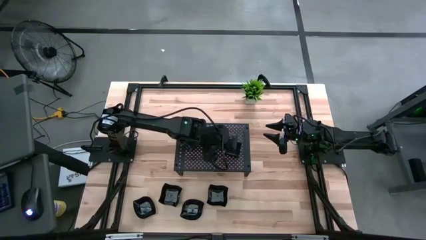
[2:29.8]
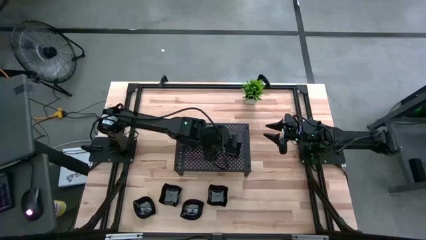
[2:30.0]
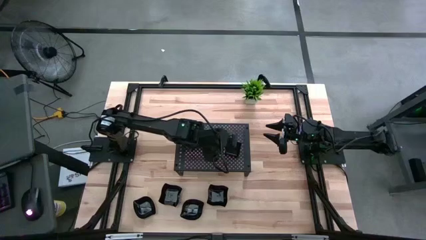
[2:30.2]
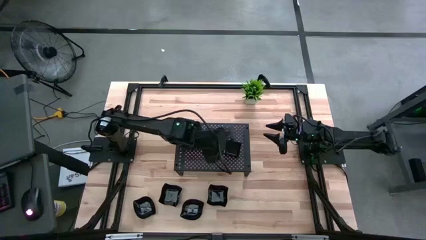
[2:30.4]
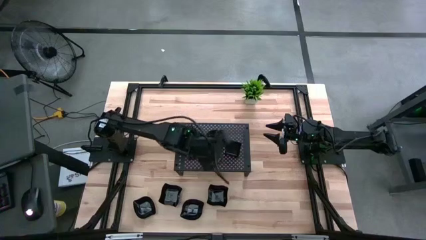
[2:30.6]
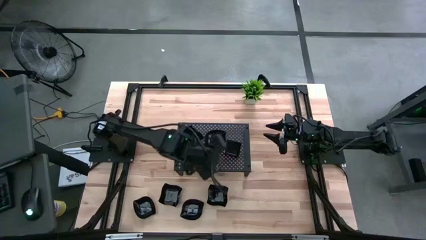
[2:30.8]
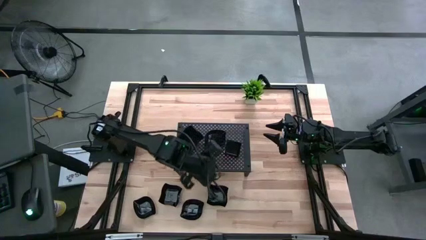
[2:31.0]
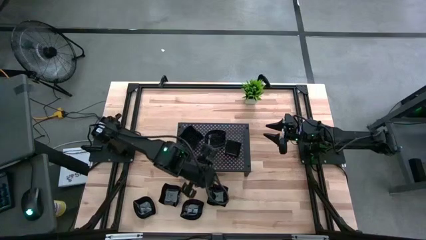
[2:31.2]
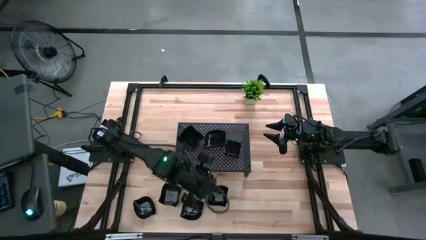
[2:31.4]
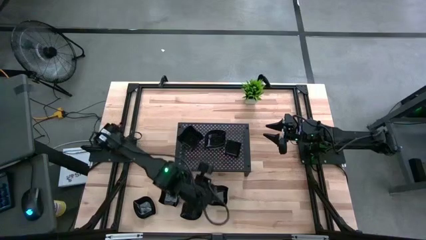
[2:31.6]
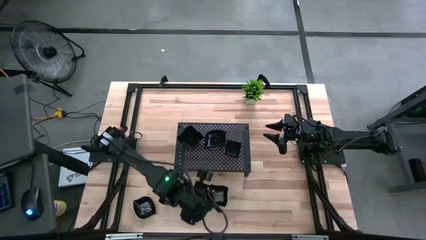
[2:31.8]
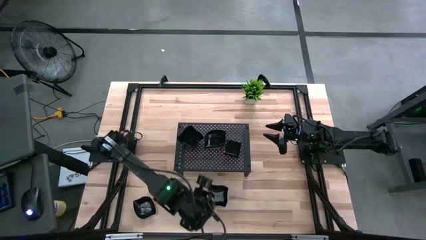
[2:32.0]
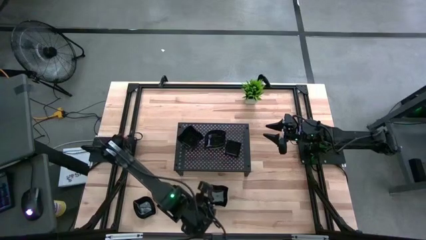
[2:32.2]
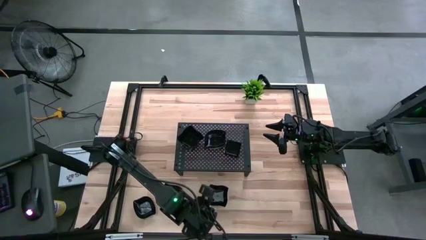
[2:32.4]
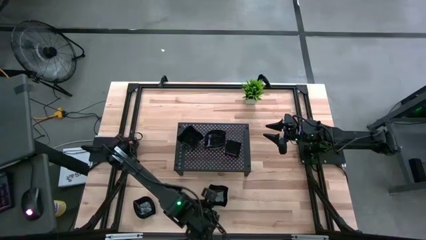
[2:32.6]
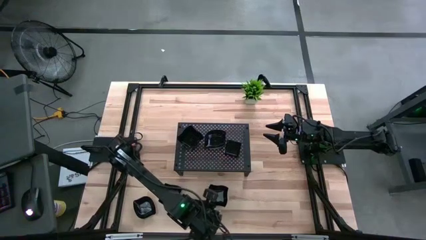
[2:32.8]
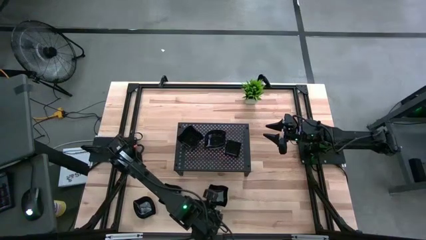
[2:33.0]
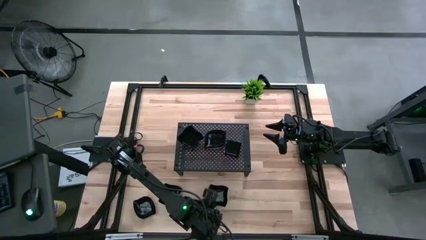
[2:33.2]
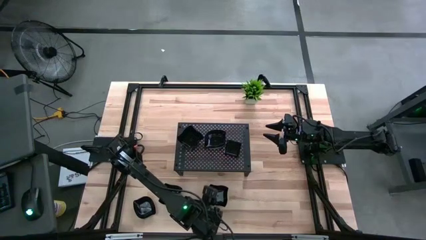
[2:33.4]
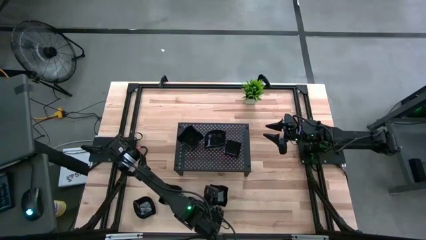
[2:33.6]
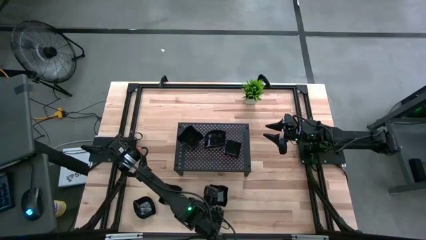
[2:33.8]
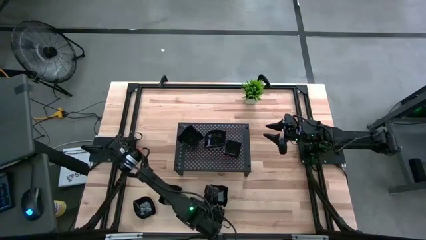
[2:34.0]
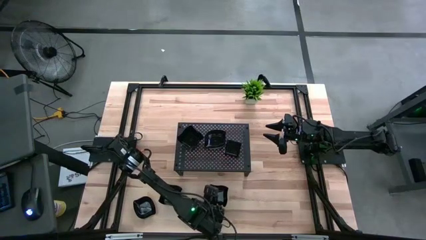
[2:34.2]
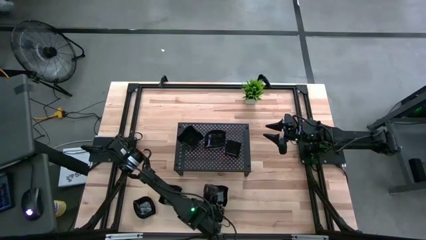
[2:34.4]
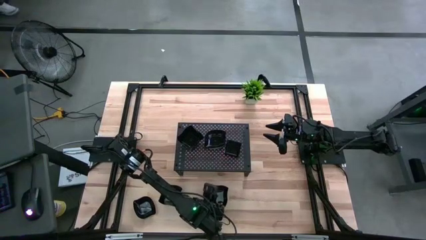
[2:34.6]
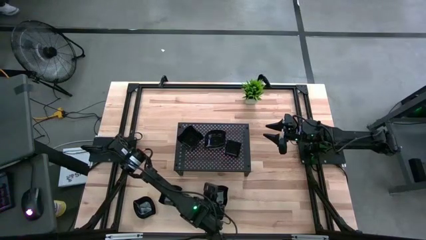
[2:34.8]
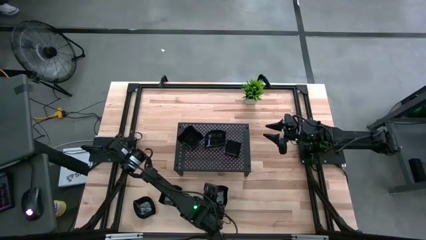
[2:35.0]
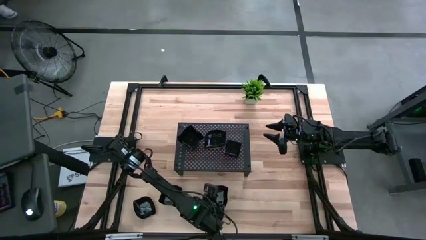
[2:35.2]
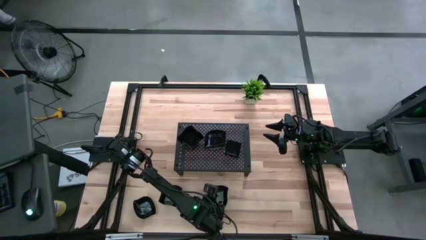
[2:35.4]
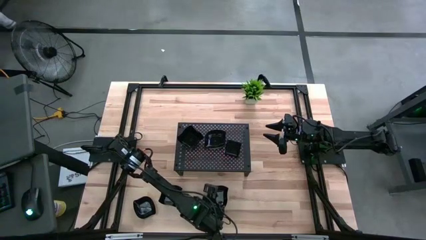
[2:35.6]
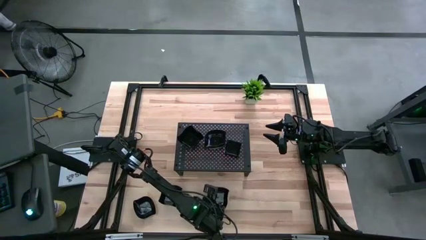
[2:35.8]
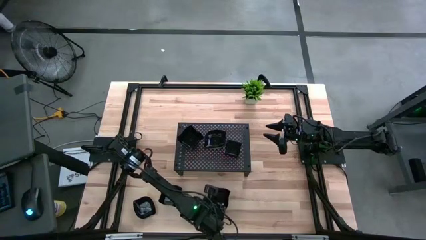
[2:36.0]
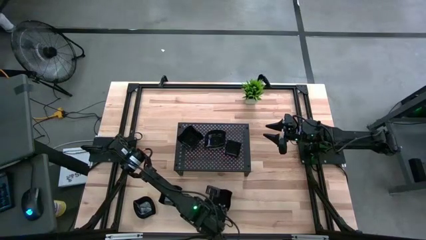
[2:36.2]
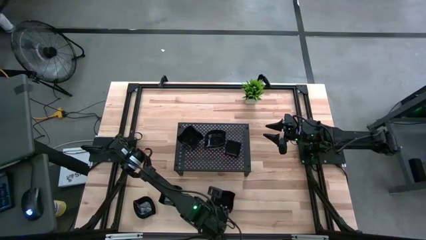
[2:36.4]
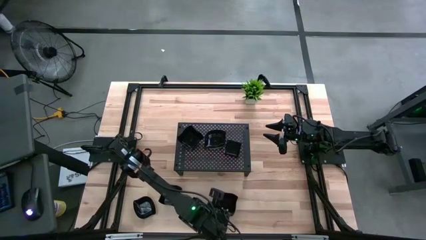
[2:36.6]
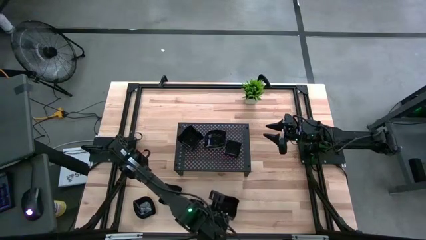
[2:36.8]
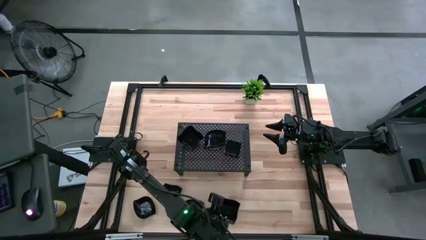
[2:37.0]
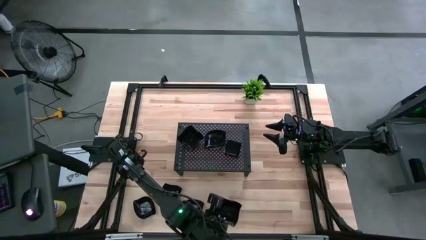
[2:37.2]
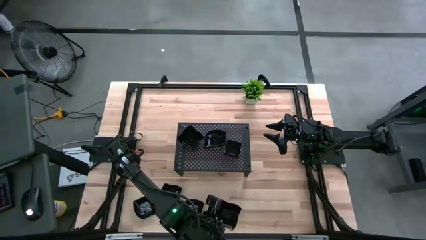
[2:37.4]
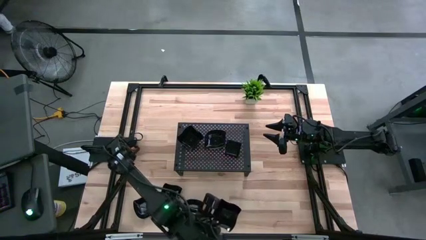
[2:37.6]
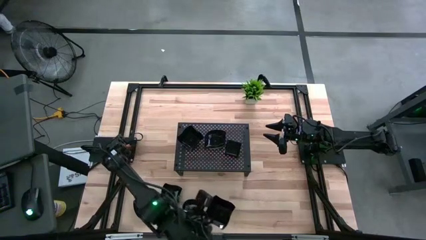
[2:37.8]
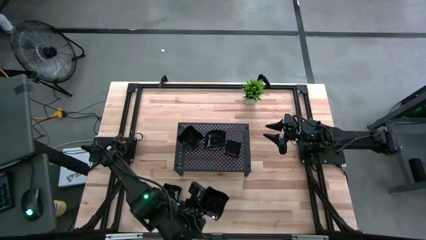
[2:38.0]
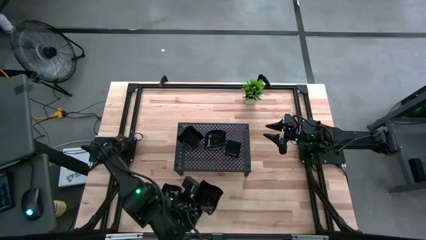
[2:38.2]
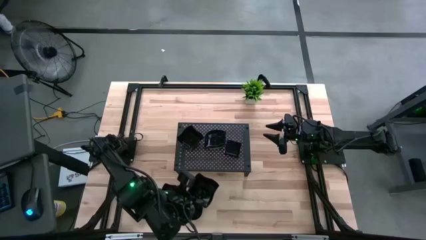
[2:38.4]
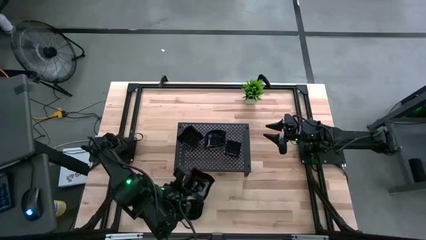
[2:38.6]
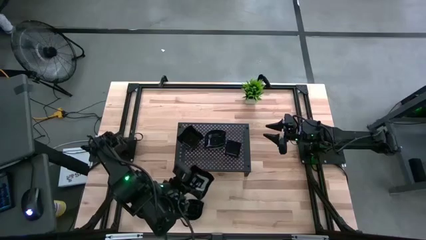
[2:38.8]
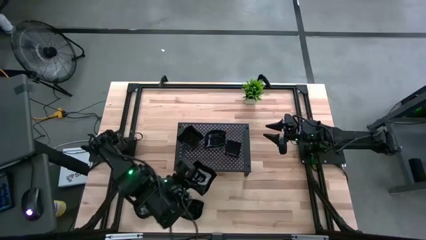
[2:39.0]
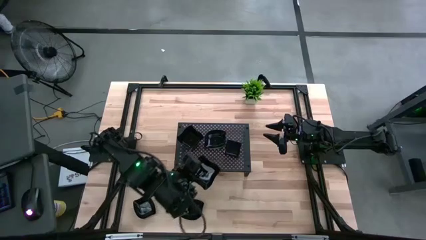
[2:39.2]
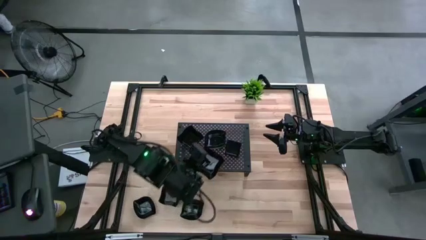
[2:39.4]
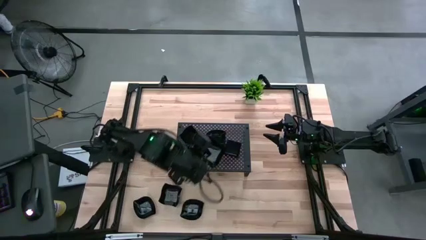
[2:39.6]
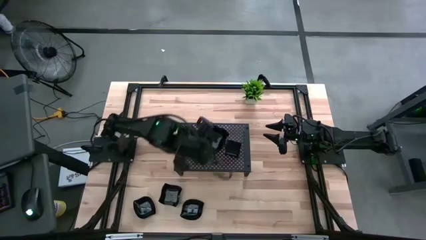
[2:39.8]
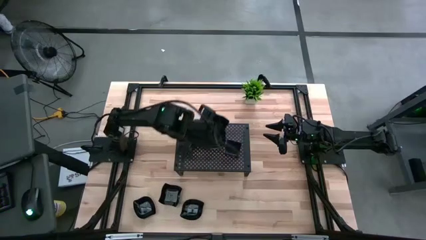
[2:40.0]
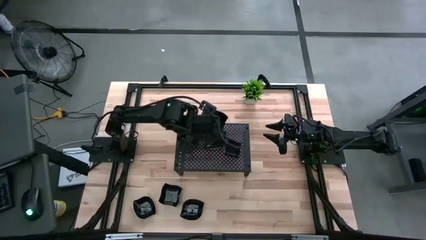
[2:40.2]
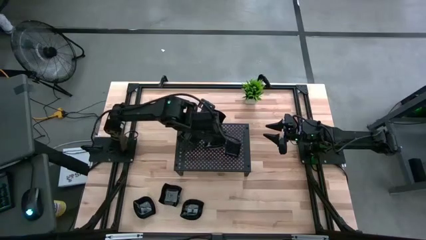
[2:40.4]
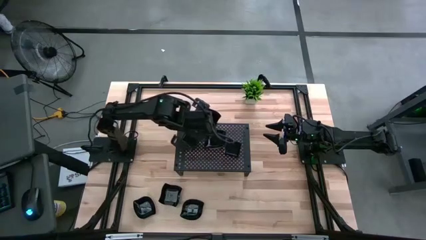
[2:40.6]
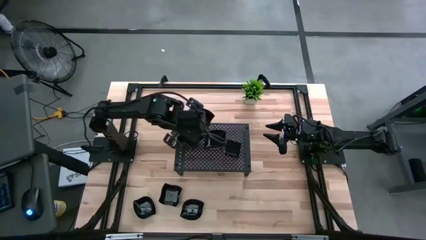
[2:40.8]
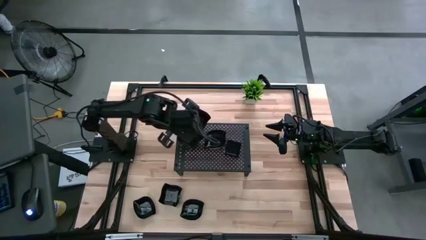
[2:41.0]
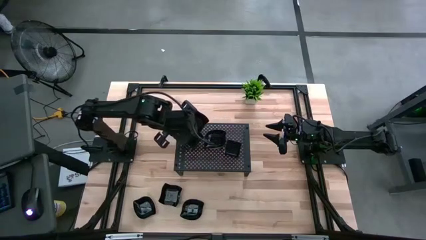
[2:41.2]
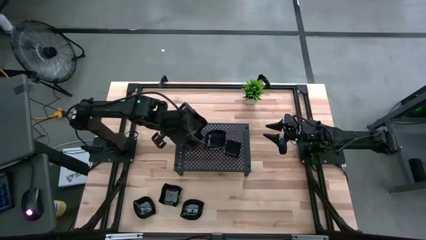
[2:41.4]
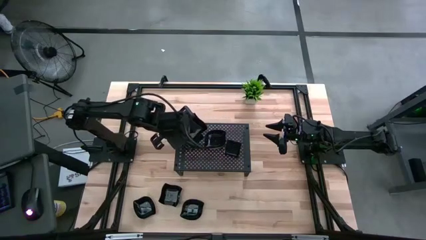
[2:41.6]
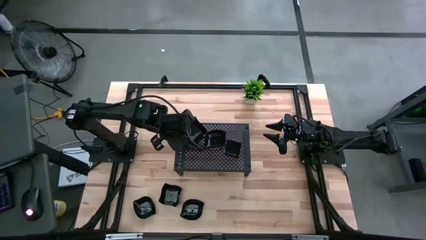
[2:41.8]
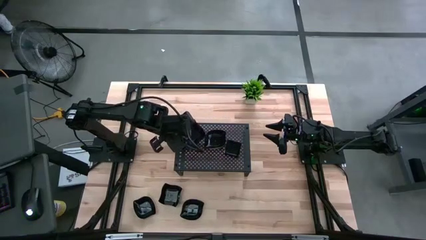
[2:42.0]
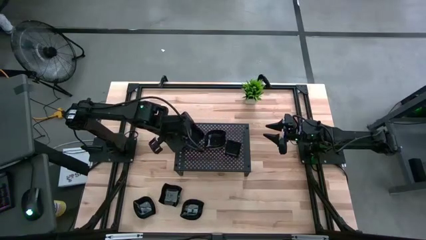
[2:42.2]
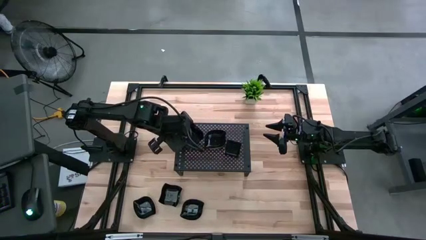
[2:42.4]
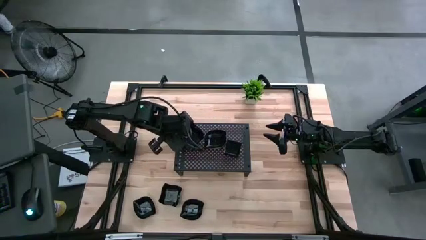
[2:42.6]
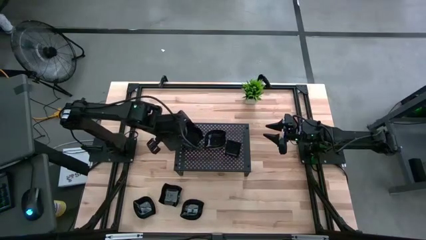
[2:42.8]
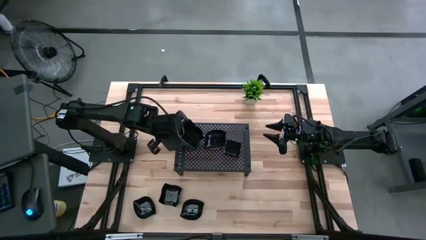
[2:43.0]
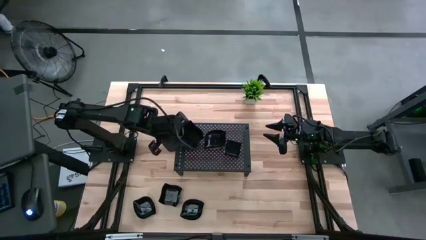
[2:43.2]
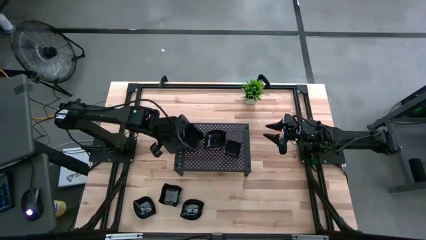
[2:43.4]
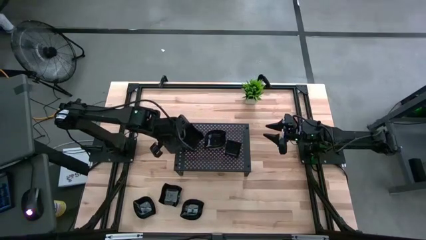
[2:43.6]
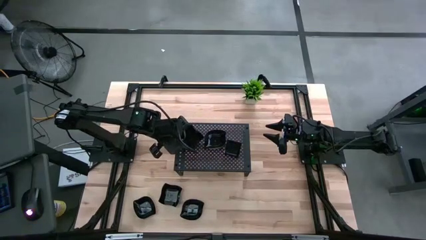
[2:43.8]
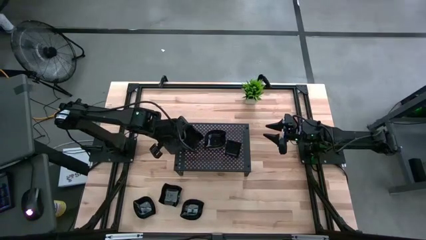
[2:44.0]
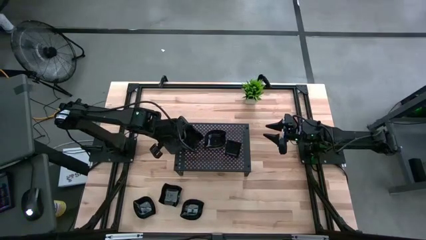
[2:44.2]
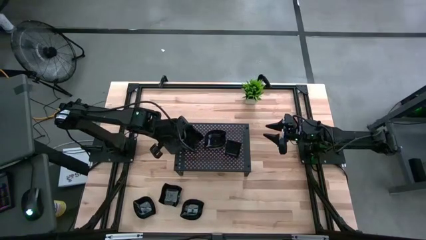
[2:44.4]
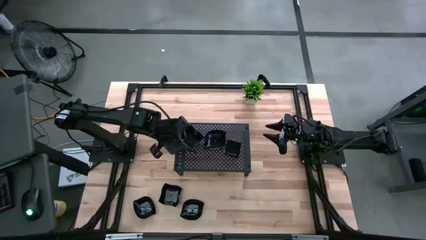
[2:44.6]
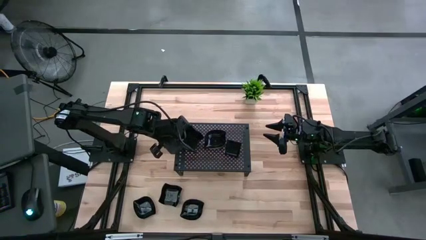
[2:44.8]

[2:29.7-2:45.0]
Task: Pick & Place Mini shaped plates
Stack the right distorted square plate on top of the distorted square plates on the shelf
